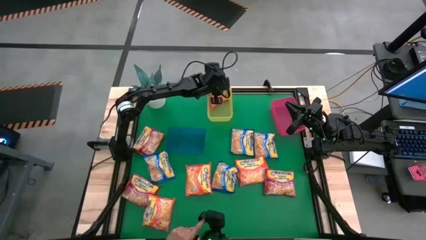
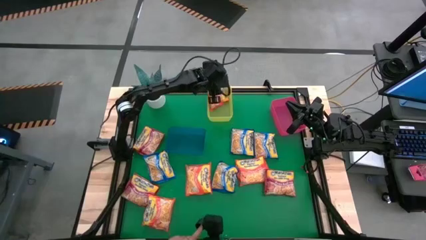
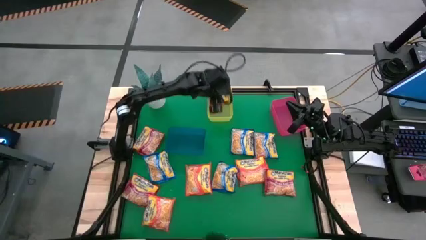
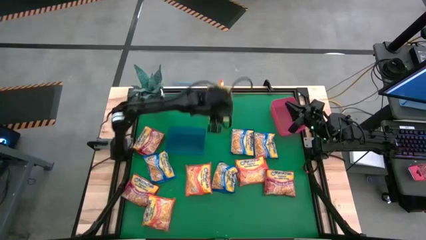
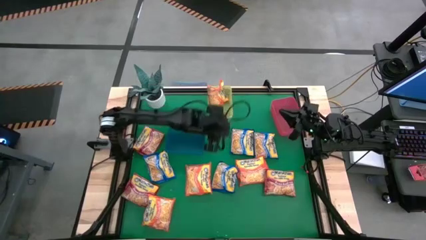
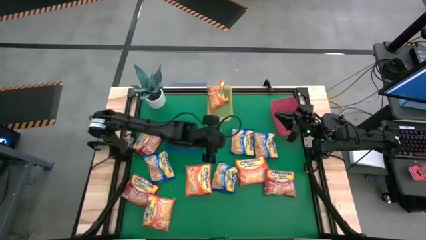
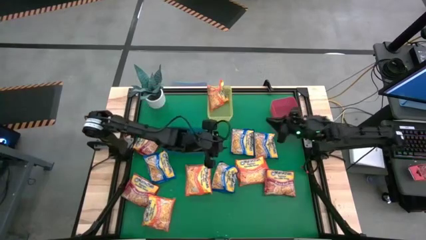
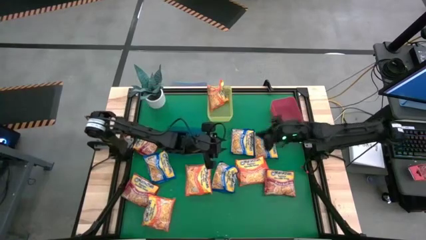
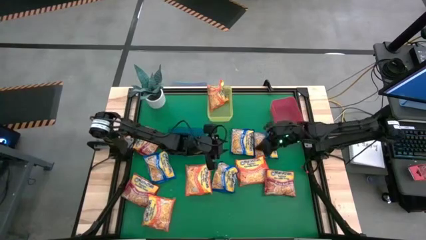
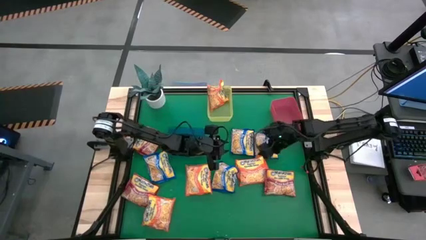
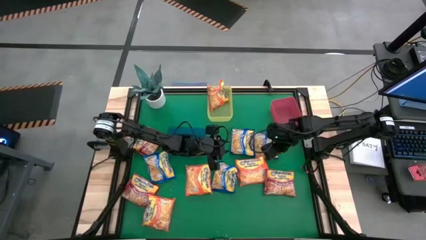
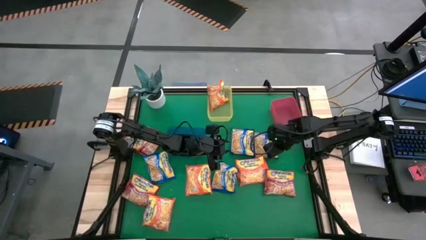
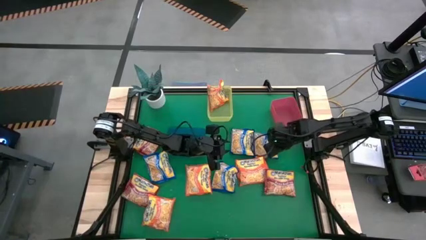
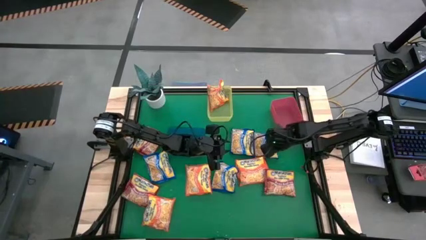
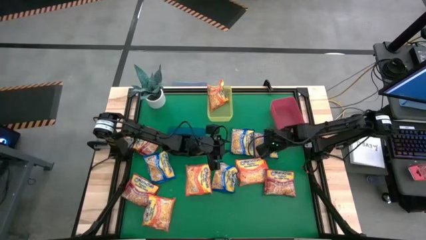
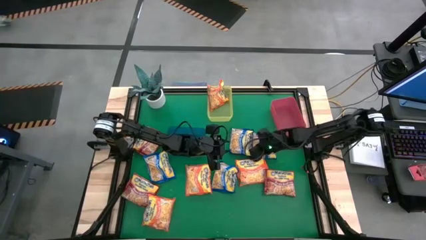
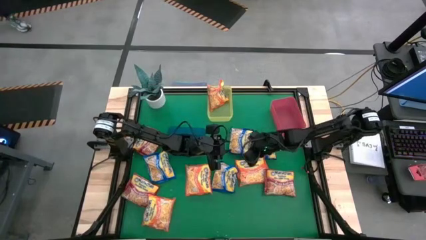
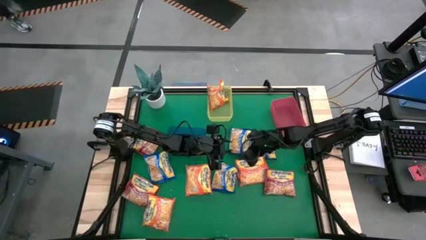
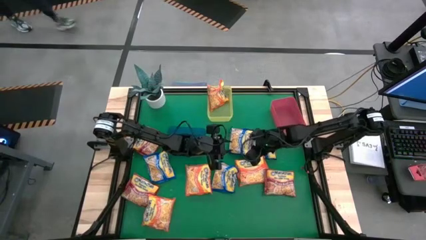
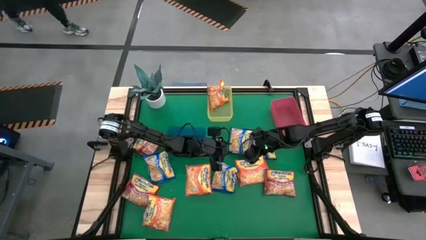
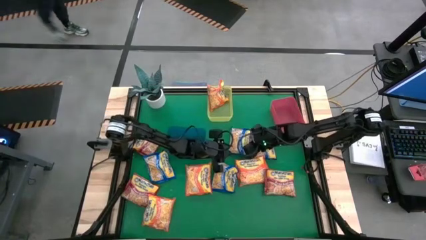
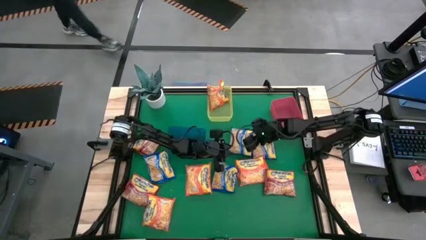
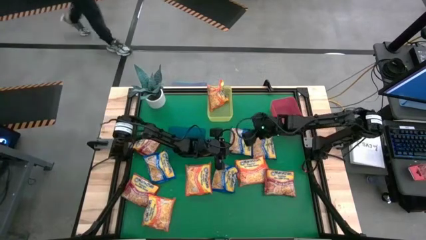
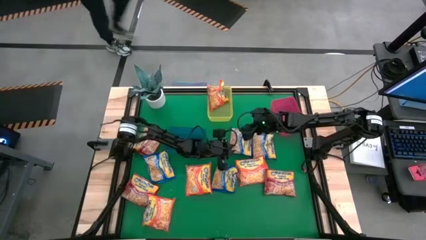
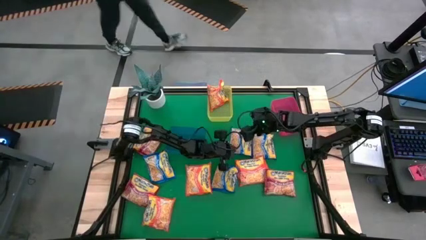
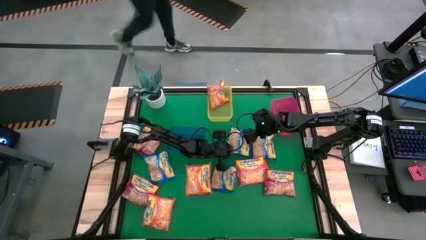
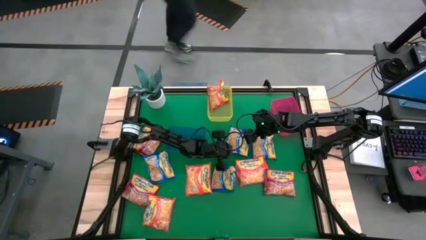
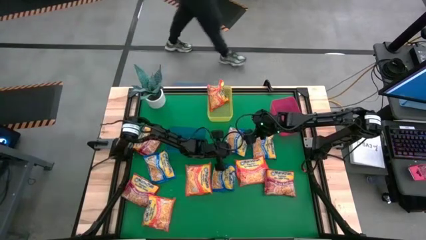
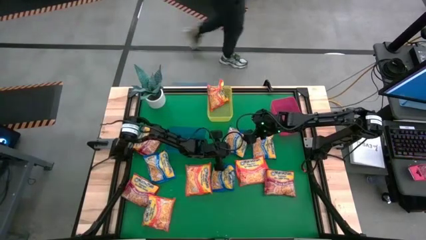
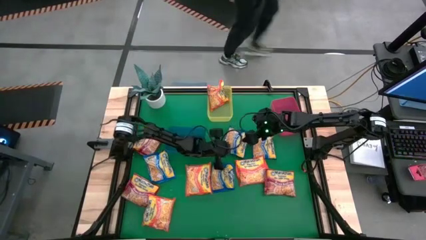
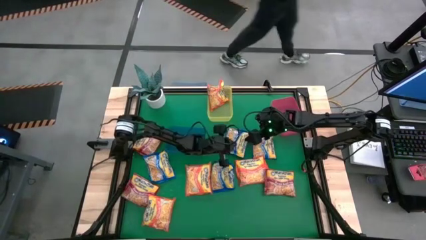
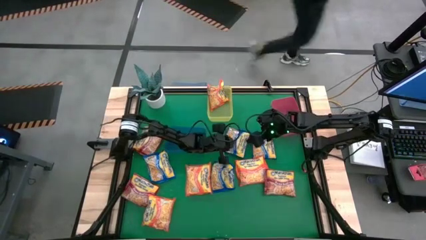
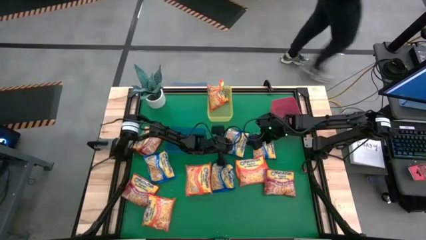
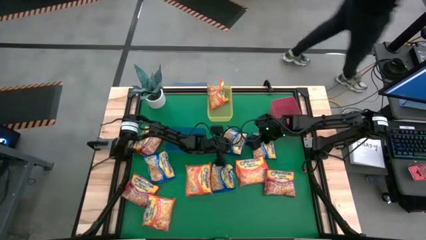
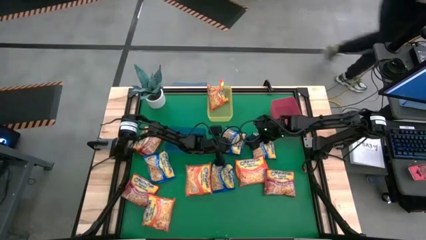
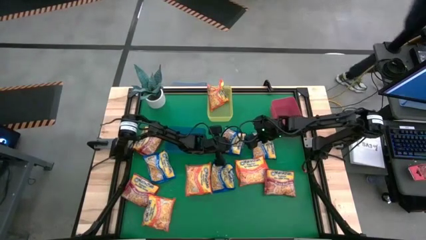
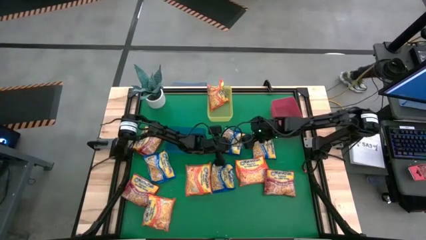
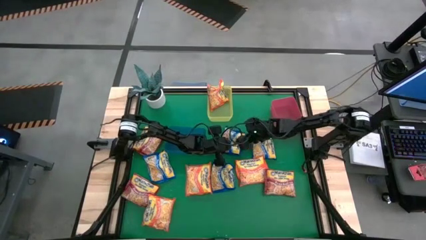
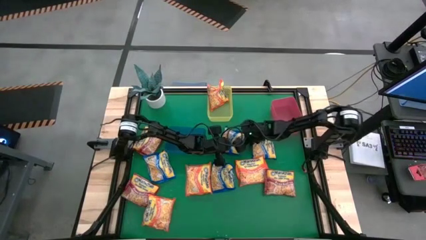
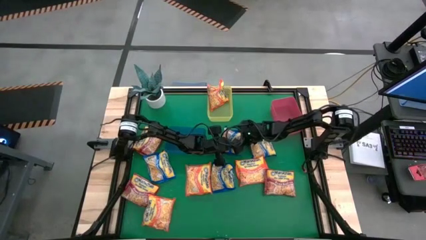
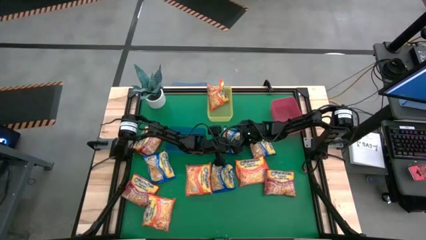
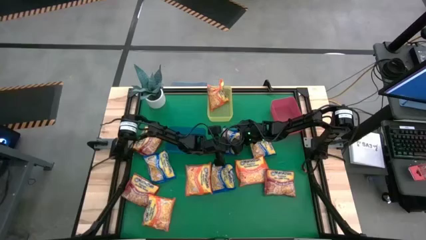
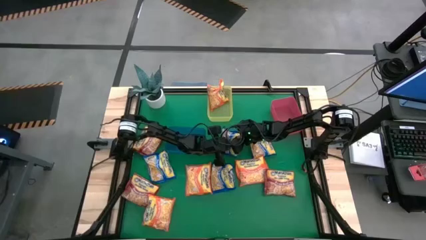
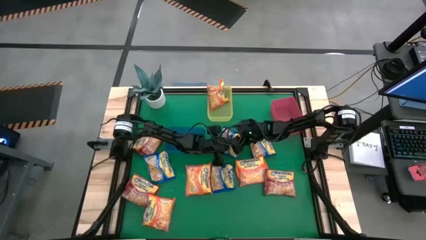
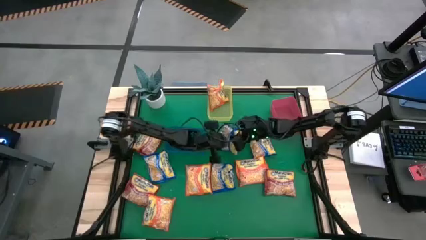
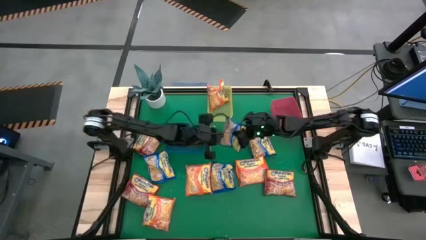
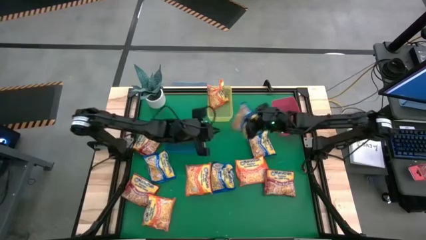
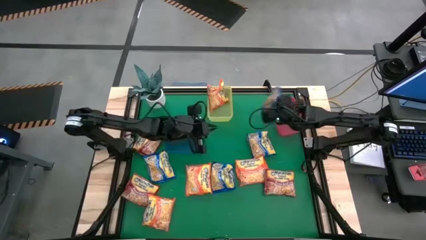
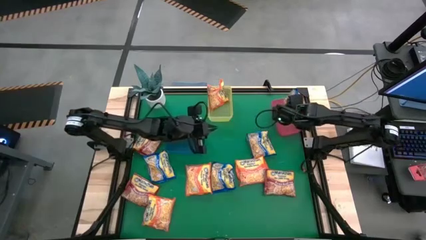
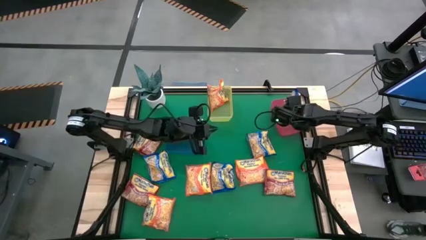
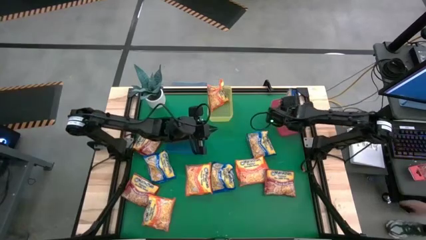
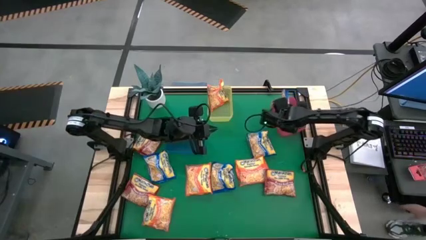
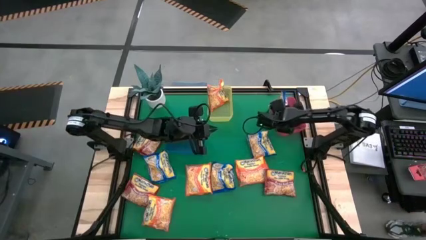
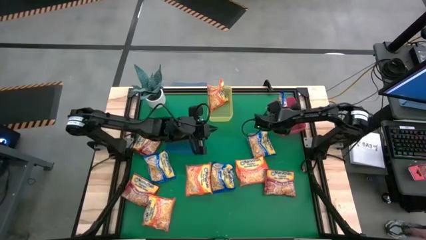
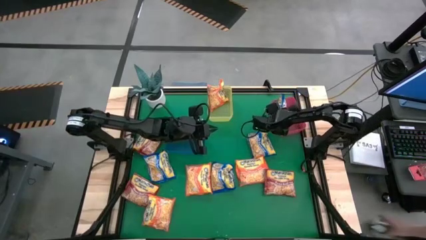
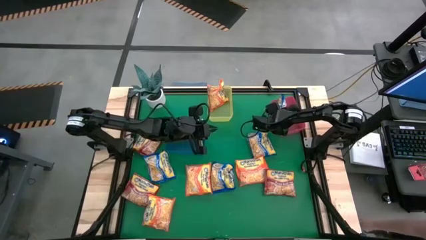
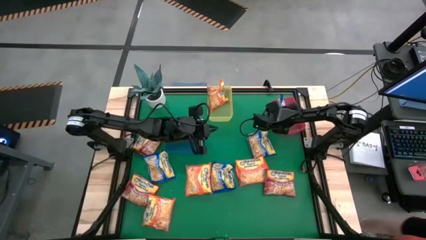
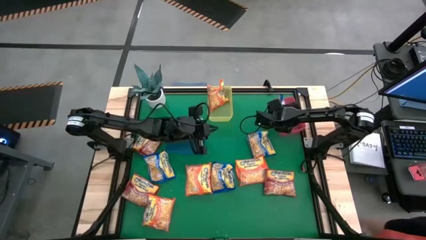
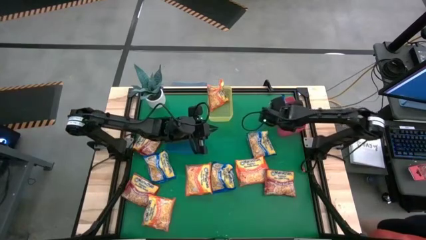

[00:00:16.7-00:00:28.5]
Task: Sort Maruchan noodles
Put the blue noodle pack into the red bin

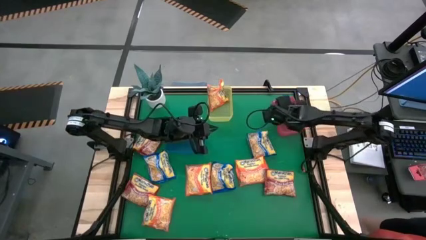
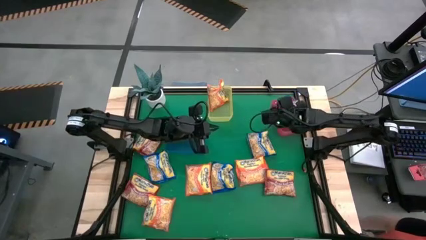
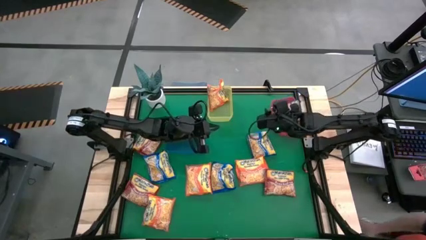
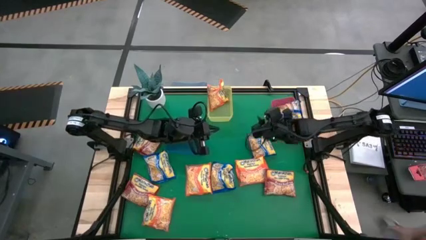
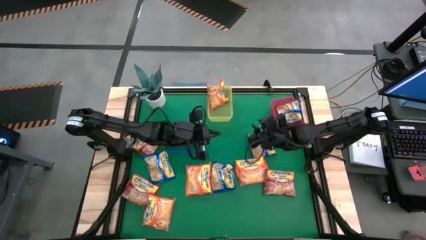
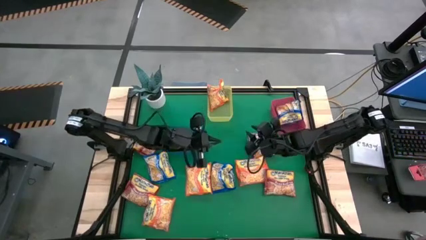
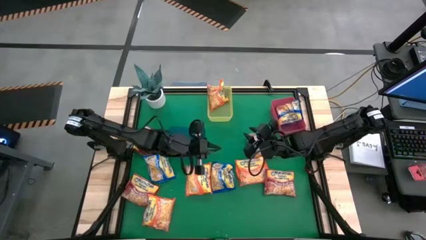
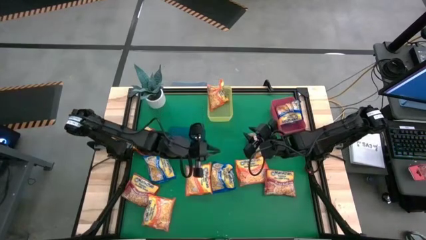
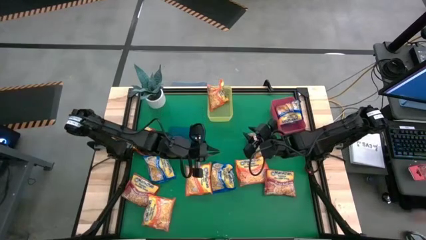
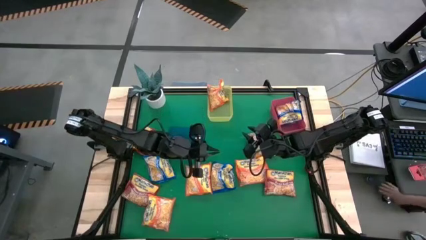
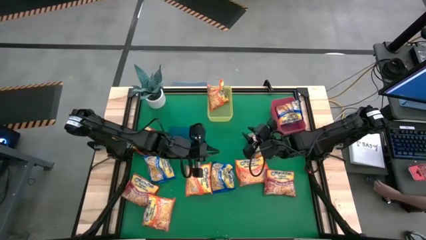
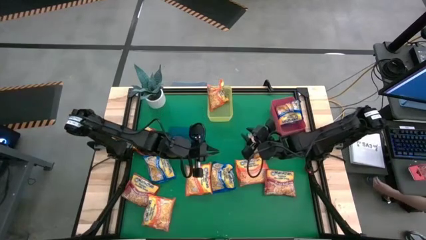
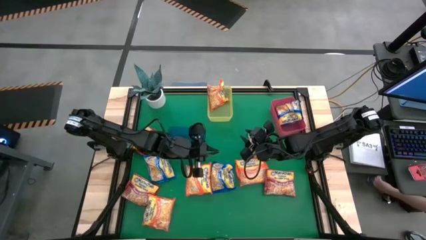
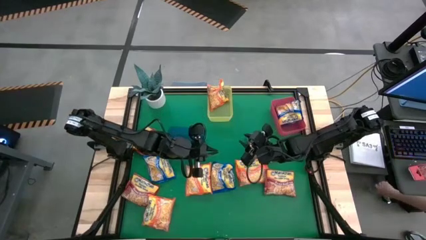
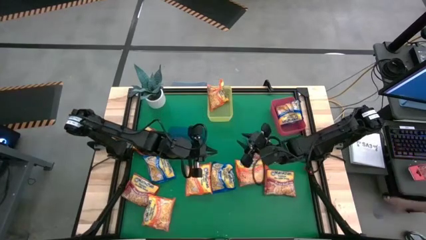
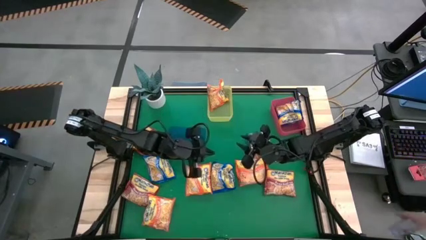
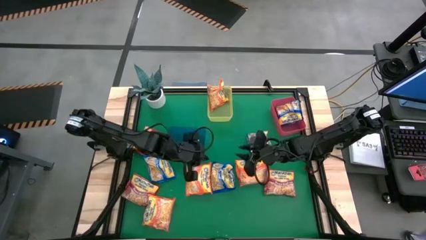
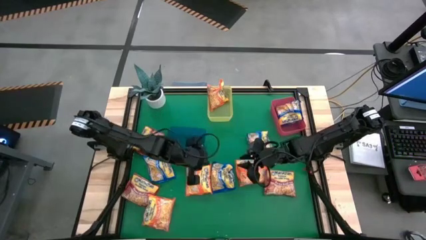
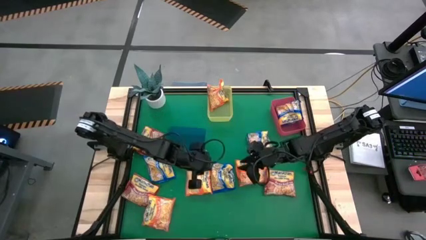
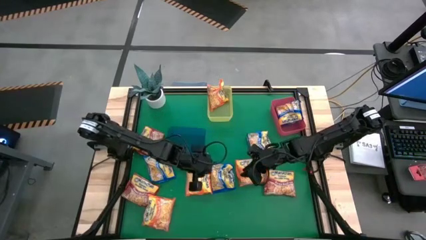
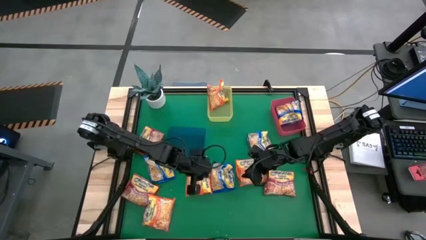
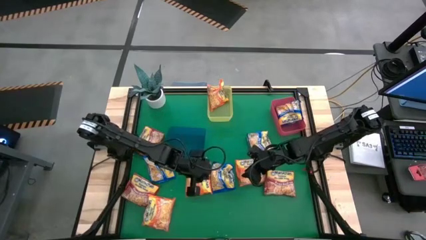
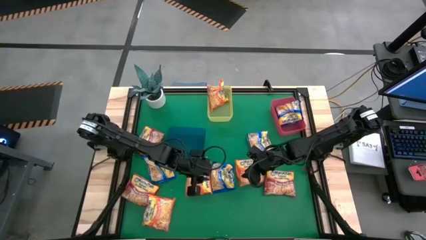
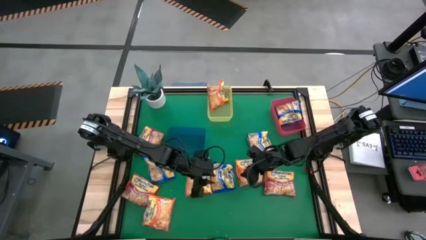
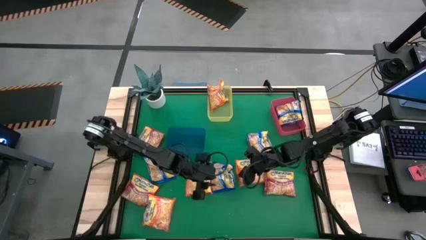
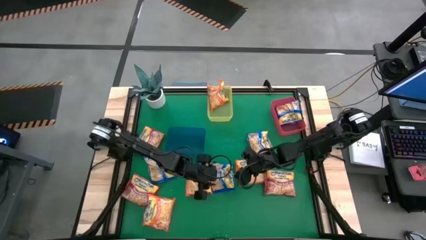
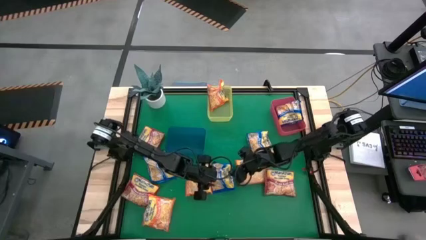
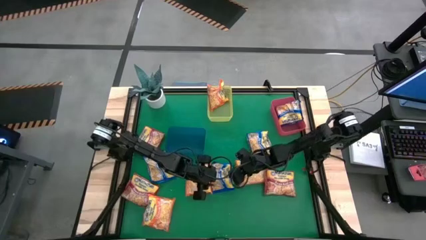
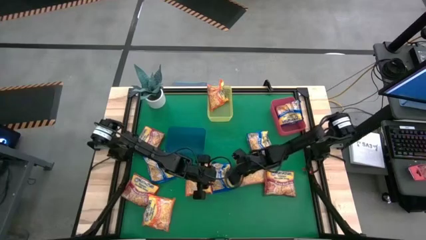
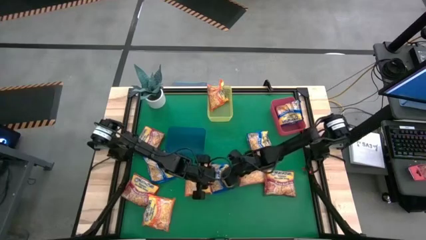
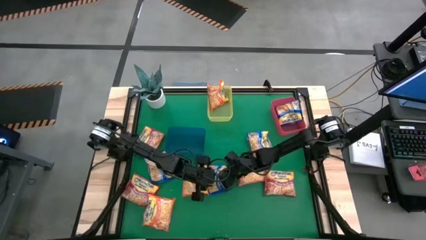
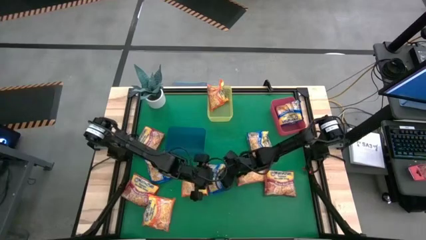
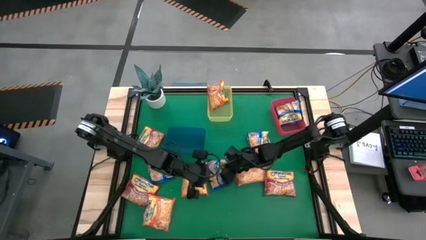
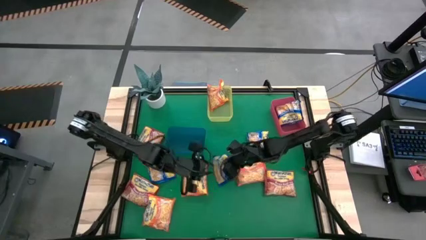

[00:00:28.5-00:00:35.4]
Put the blue noodle pack into the red bin
